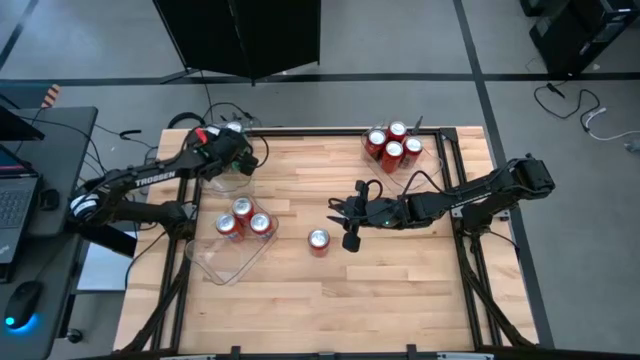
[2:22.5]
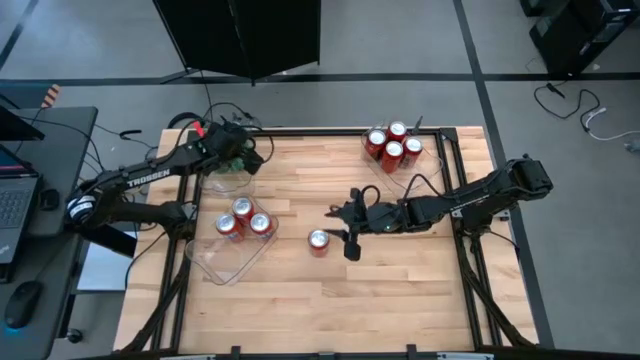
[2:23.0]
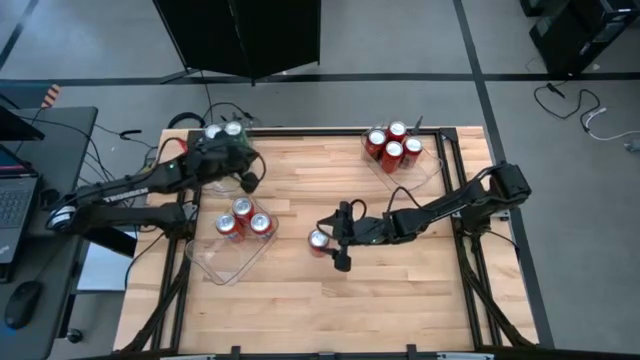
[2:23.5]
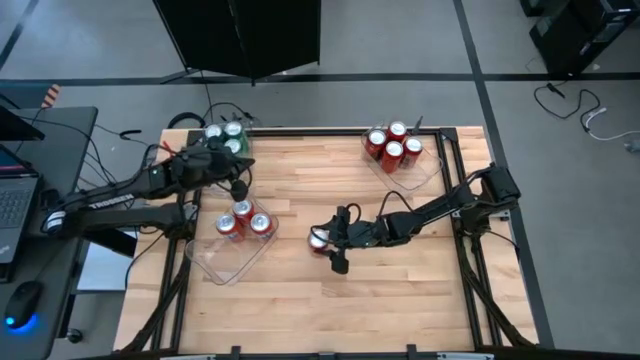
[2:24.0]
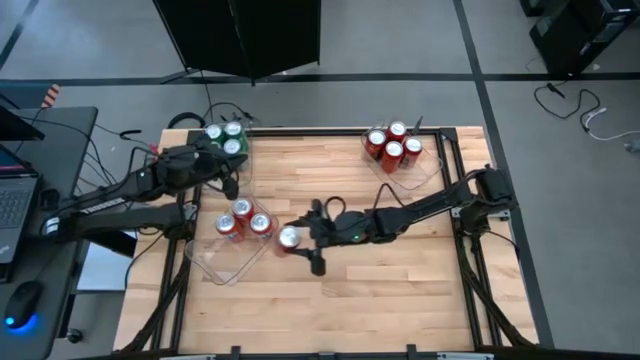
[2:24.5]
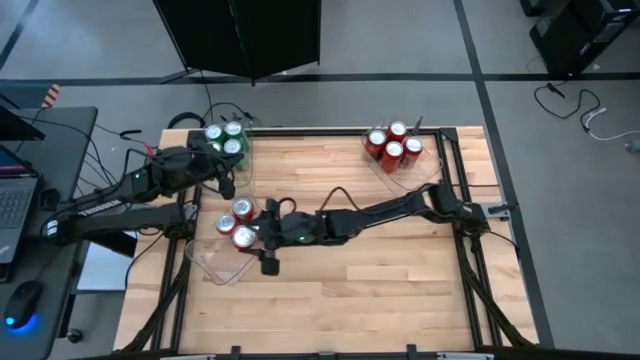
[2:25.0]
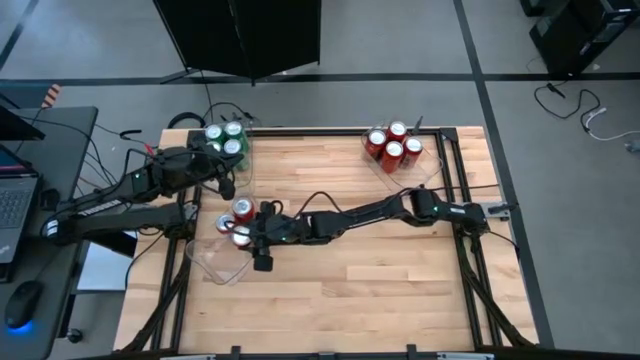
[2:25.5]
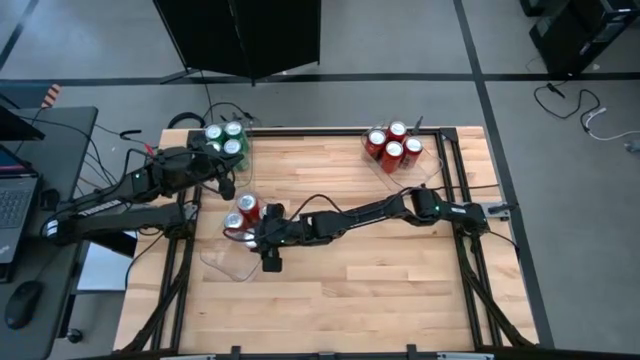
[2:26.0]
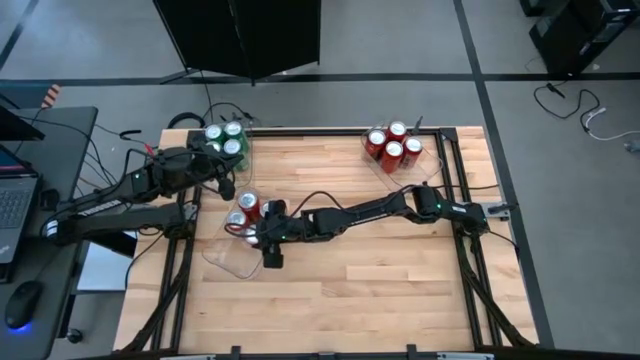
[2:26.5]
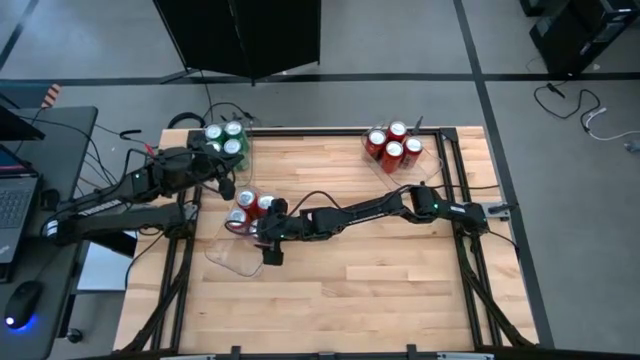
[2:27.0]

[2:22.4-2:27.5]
Task: Sort soda cans
Put the red soda can into the bottom left transparent bin

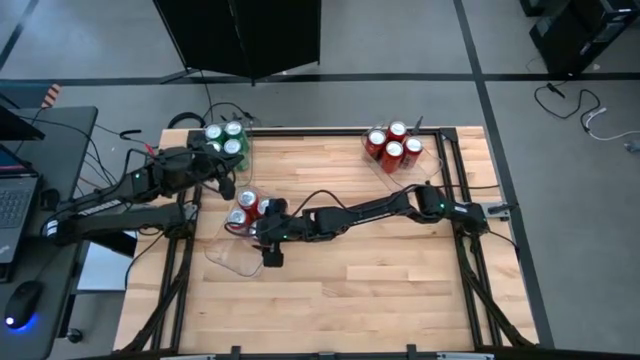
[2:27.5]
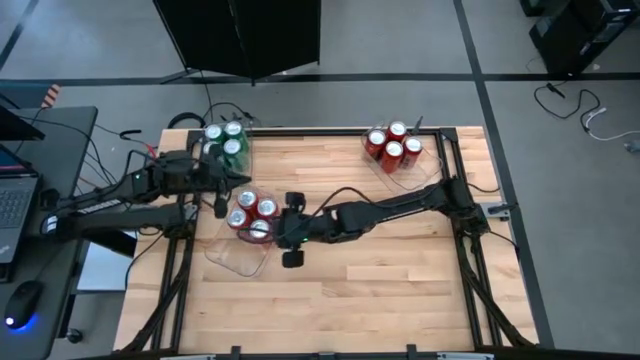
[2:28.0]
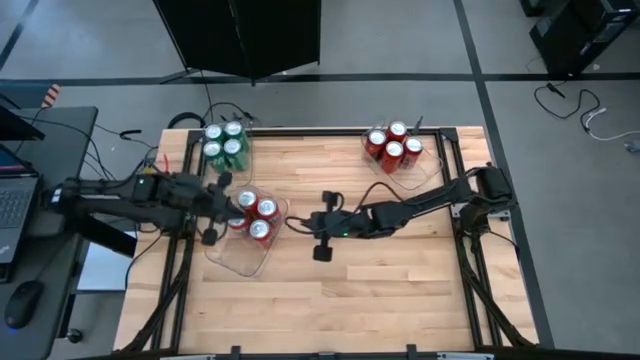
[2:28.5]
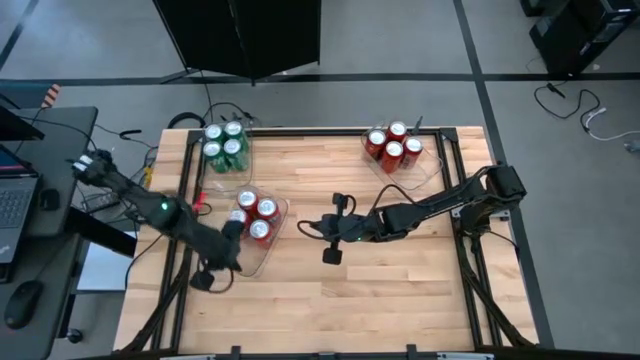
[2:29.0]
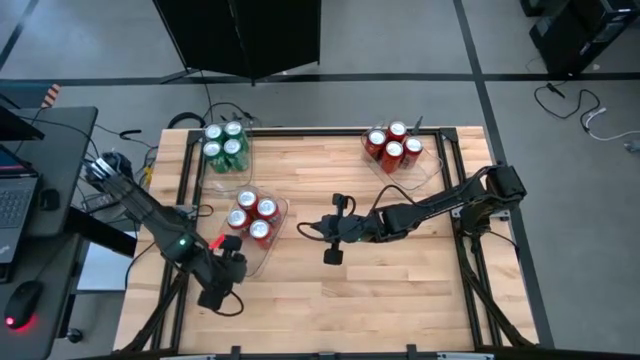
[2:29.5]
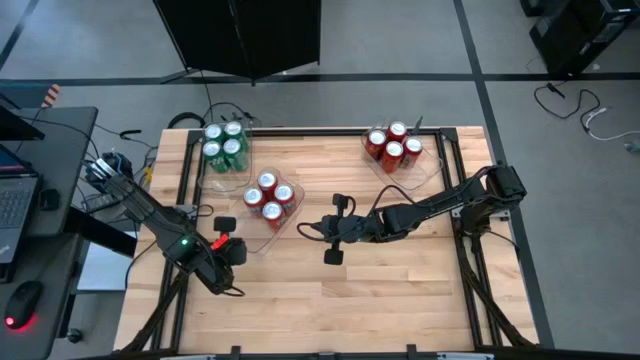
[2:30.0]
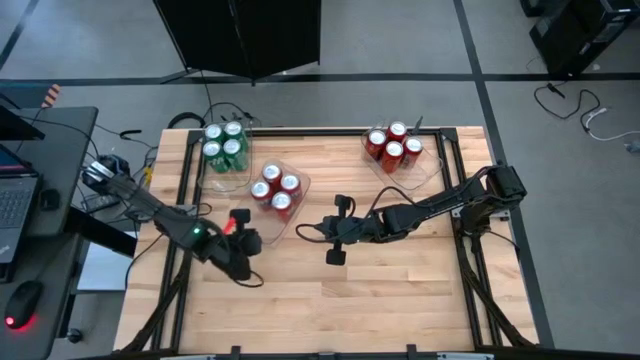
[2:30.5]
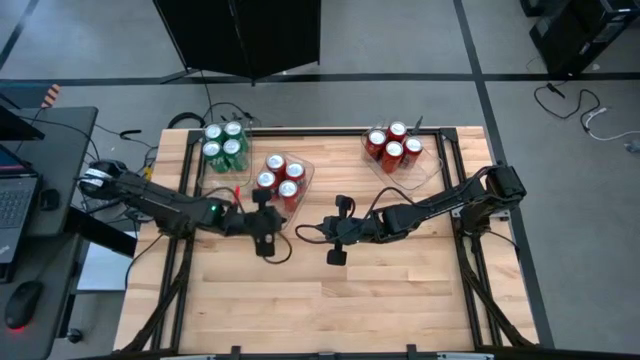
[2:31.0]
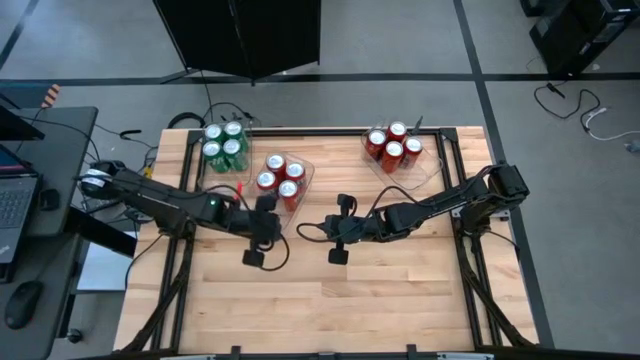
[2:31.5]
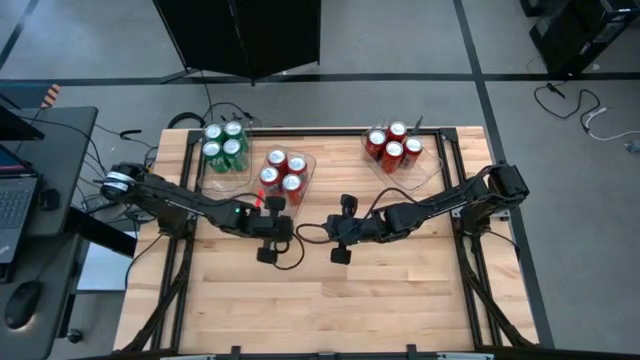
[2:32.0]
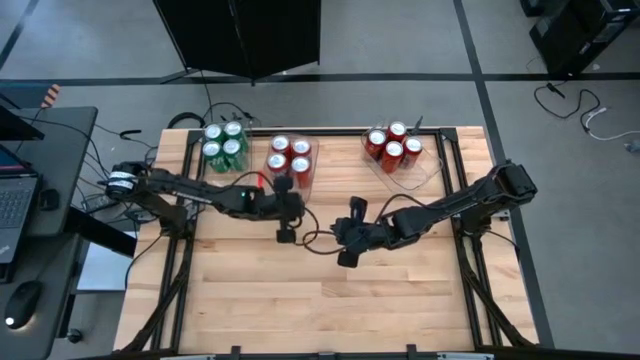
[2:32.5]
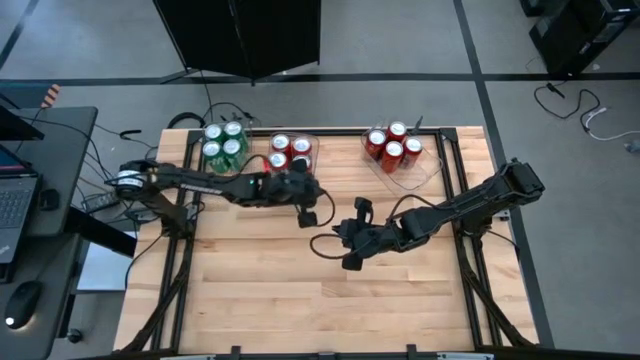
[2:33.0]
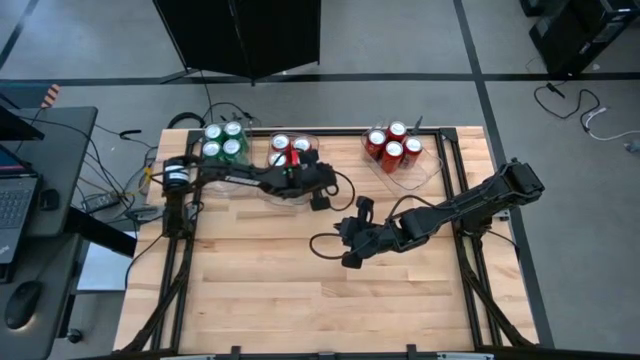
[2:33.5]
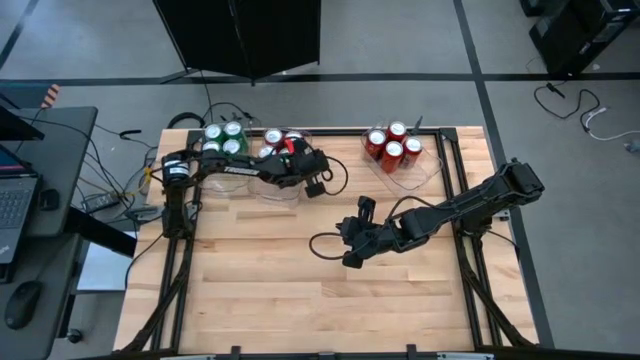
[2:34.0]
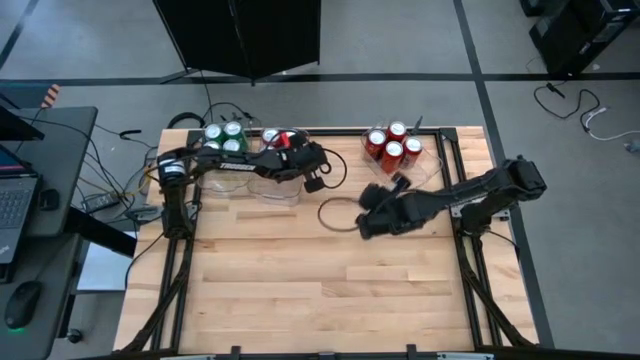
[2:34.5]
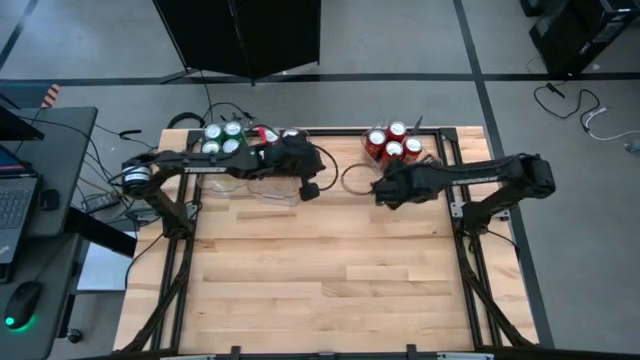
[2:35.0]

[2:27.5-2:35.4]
Move the bottom transparent bin to the top center

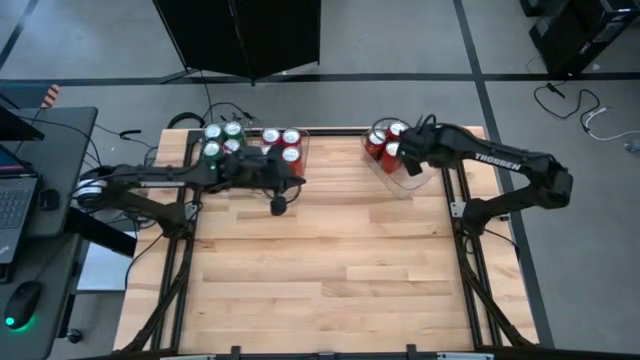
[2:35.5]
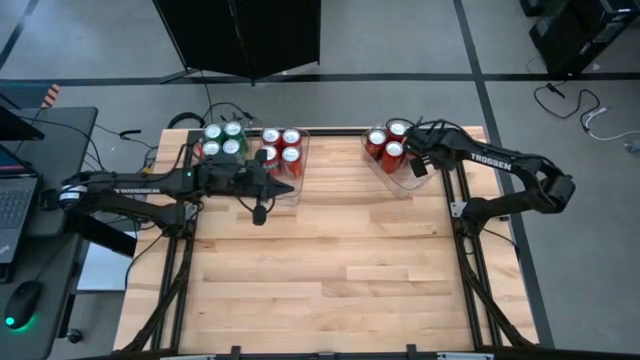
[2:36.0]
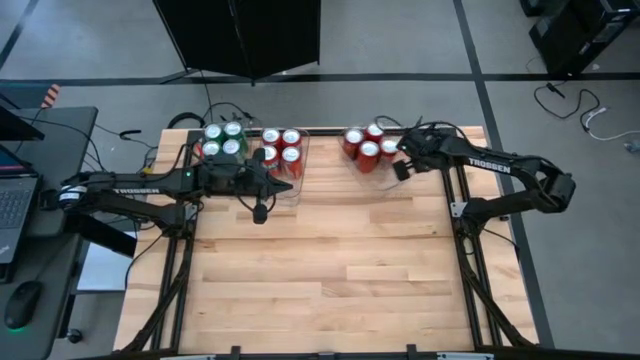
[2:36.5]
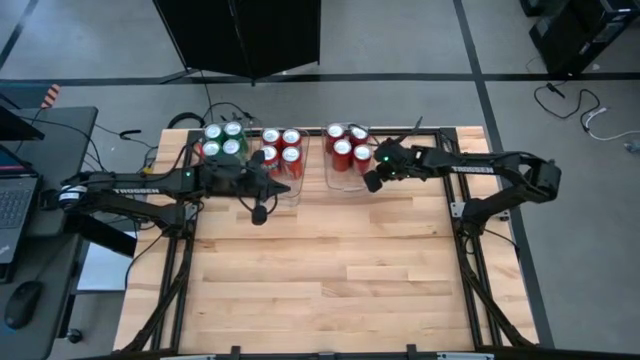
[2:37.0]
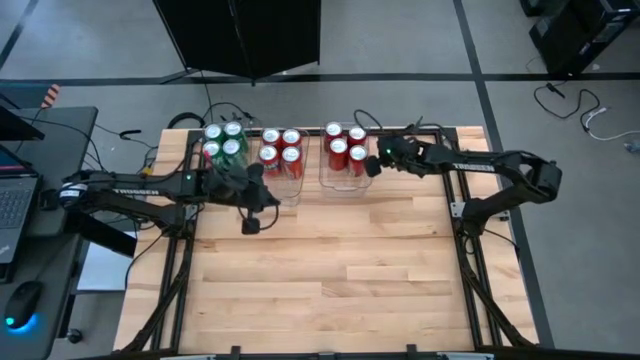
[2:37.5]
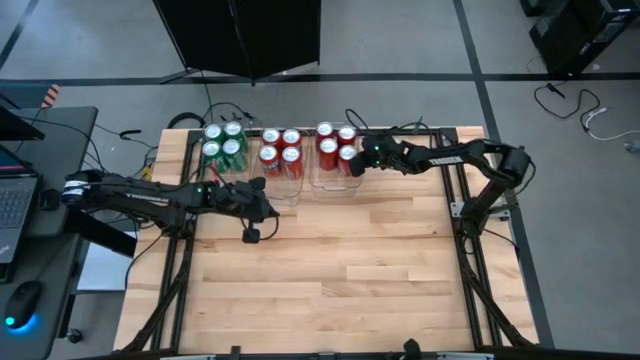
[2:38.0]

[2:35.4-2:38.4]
Move the top right transparent bin beside the middle transparent bin

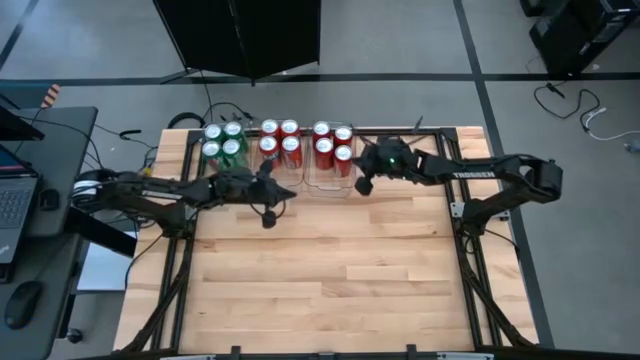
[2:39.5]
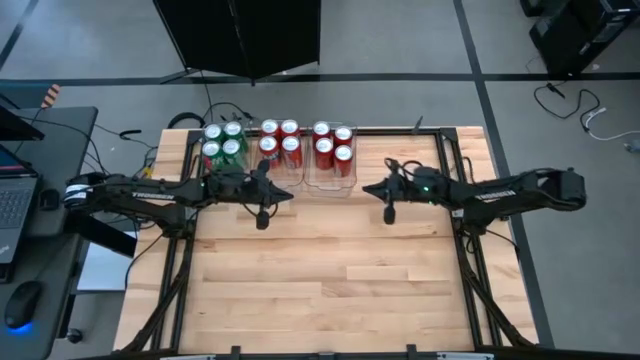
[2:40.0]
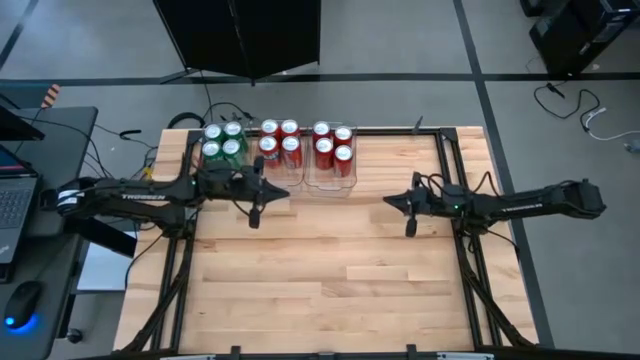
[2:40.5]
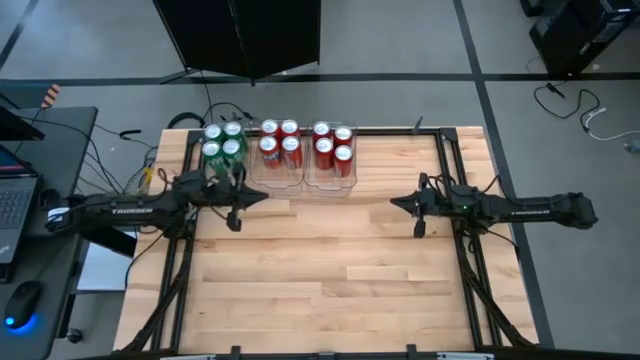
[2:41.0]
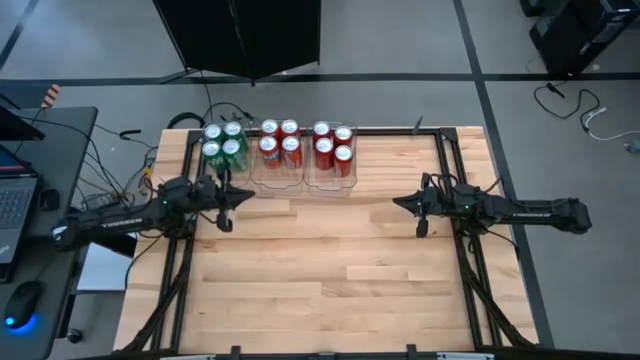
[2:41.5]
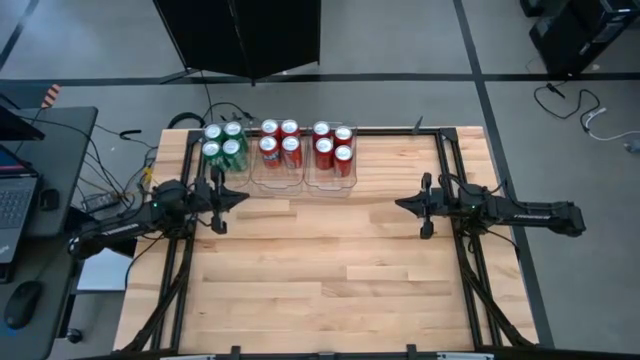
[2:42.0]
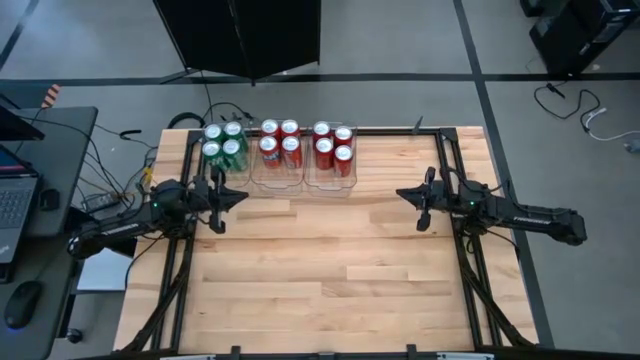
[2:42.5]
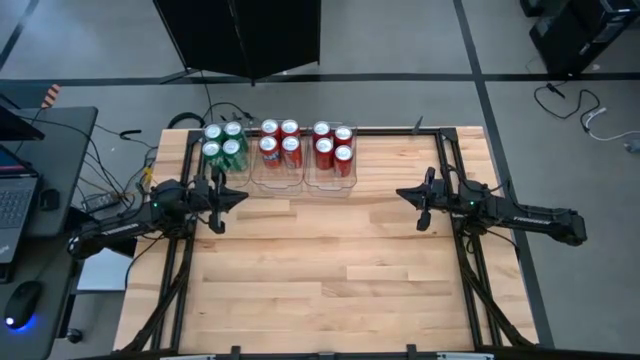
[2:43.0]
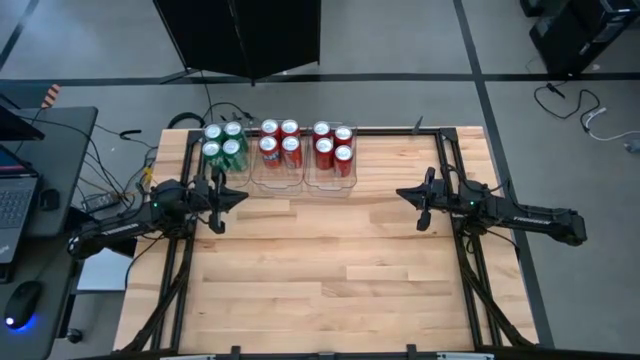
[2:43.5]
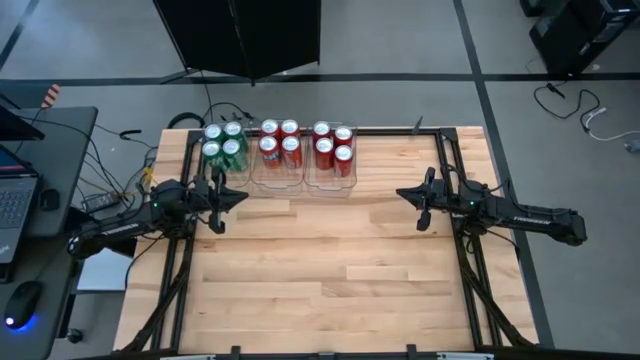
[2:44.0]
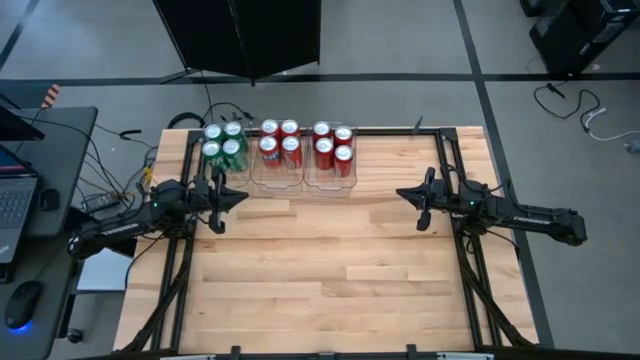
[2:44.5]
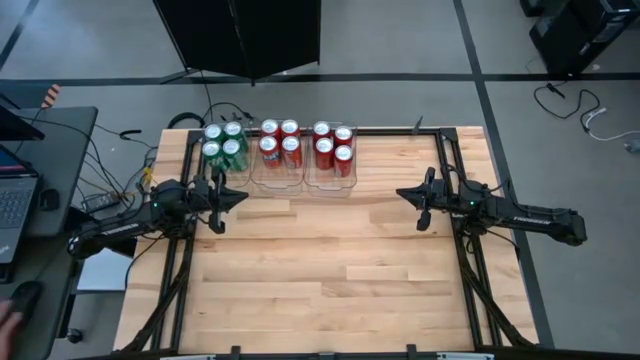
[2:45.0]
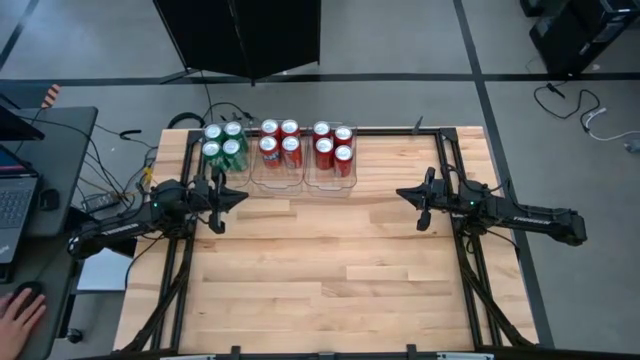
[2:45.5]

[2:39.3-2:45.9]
Return to Home Position
